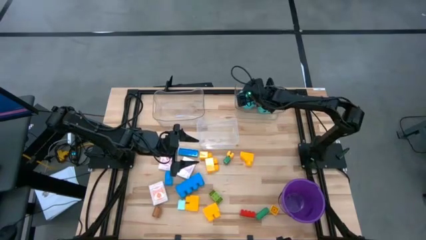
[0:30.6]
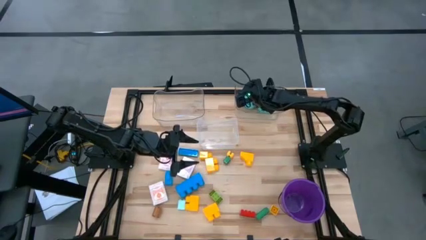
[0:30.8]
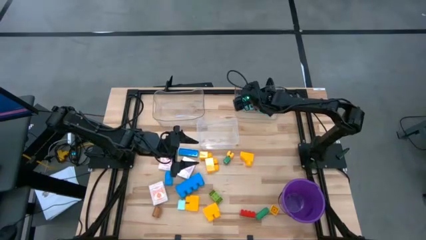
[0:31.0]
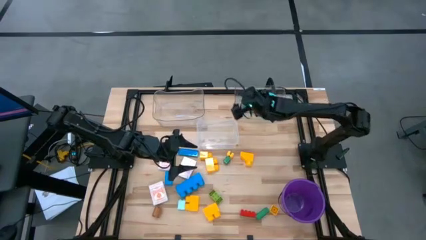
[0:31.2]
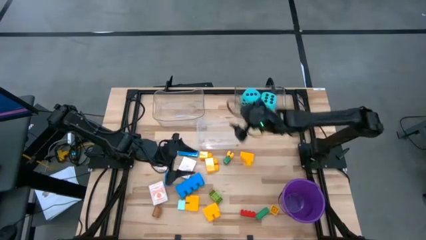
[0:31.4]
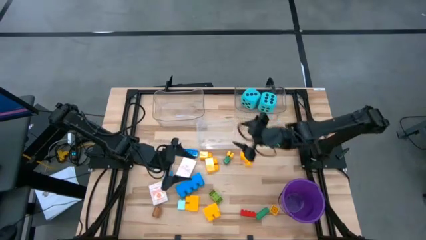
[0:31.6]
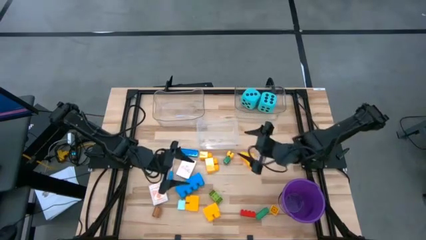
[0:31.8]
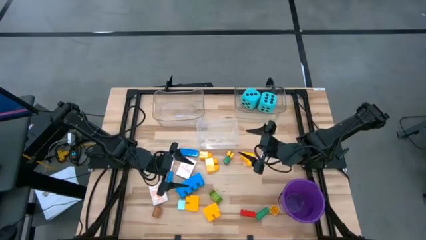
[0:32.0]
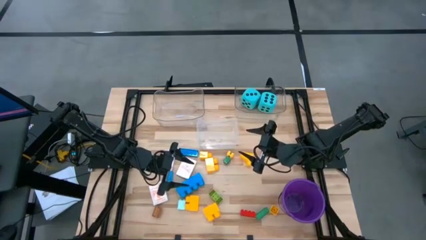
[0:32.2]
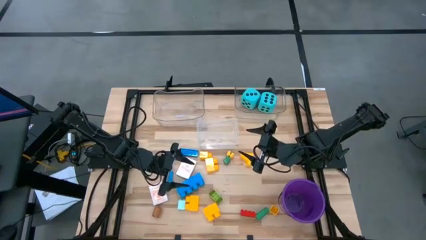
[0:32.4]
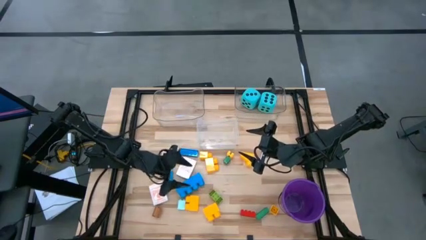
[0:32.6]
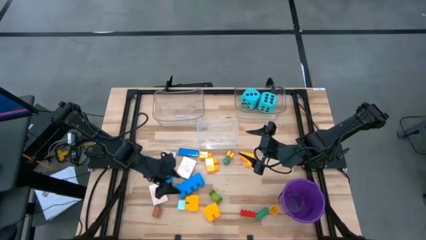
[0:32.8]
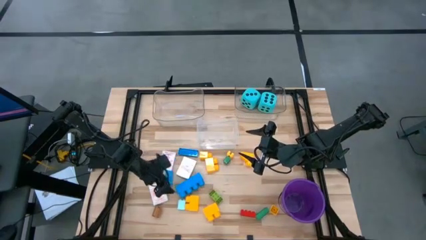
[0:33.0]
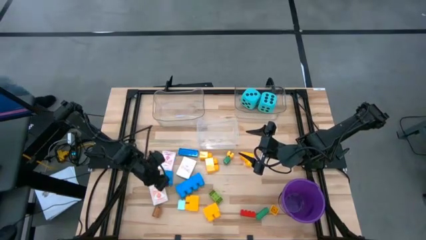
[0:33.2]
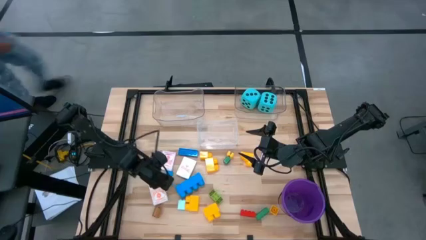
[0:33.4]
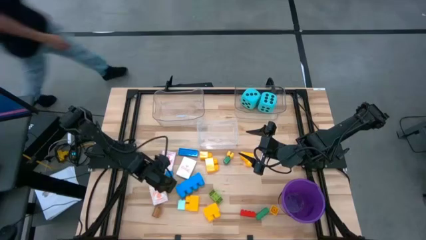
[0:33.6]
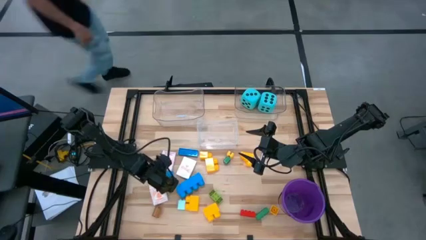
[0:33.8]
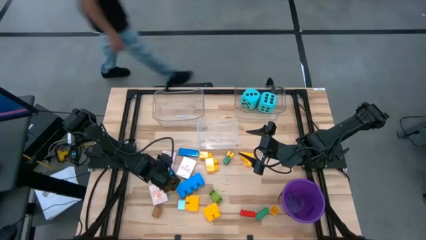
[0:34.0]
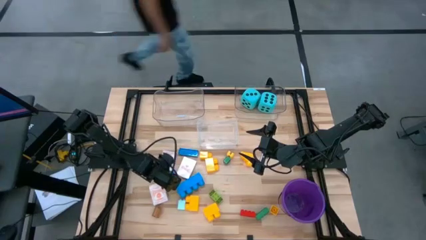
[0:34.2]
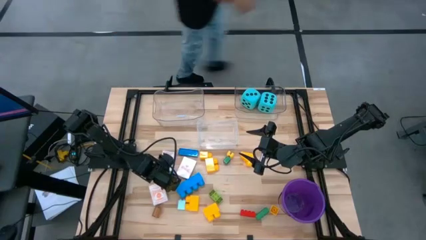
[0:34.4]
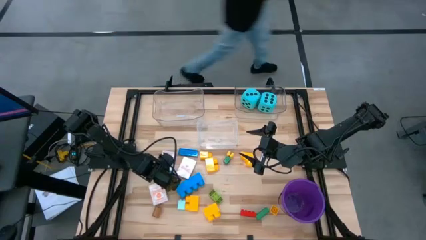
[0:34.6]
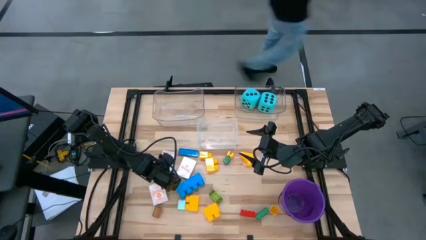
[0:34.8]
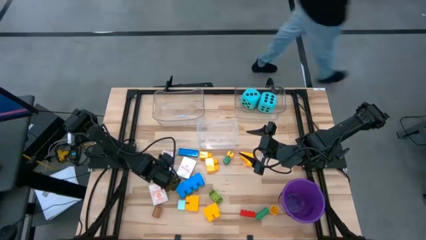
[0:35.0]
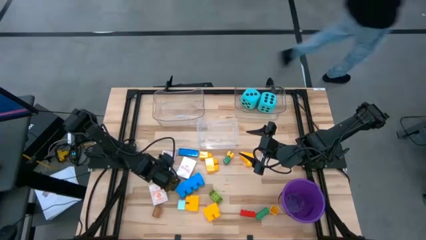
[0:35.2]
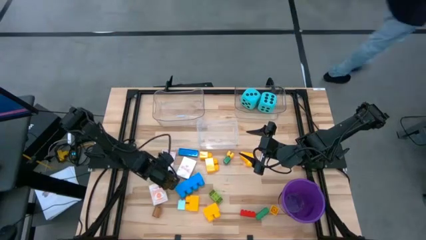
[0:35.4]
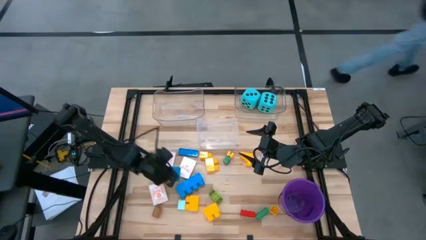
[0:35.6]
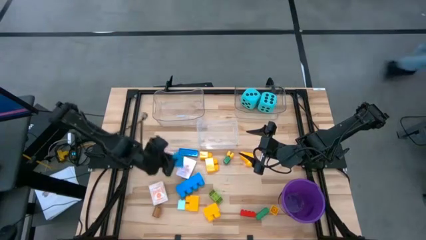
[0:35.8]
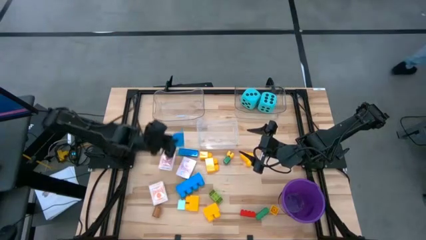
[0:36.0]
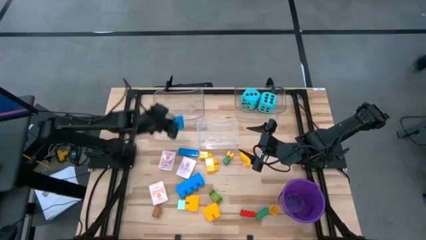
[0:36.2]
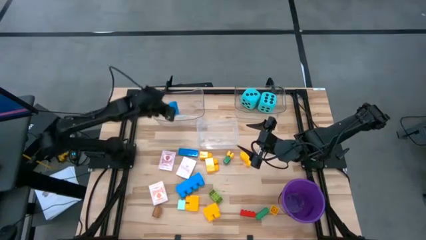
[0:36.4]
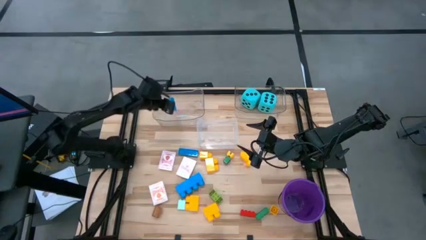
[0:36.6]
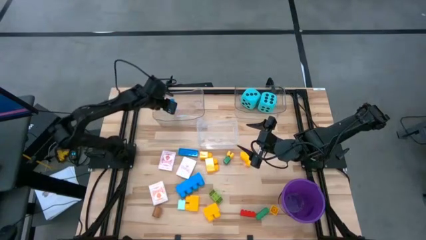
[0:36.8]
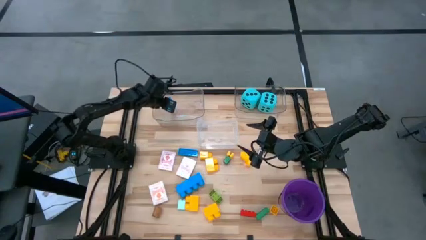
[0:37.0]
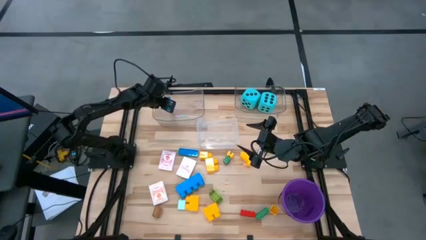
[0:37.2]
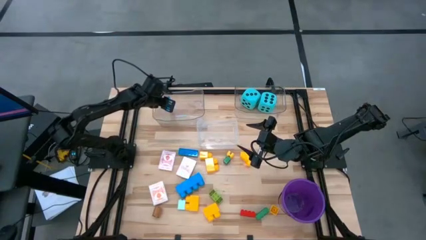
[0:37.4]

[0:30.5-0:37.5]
Task: Pick & Place Toys
Put the blue game piece into the top left transparent bin

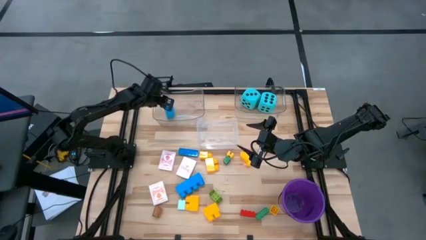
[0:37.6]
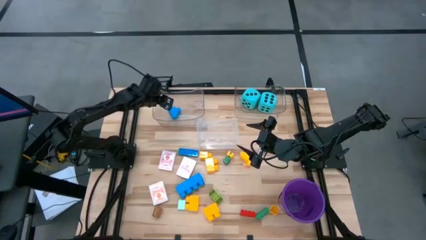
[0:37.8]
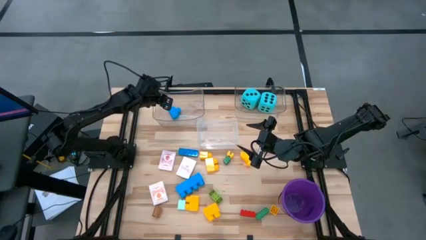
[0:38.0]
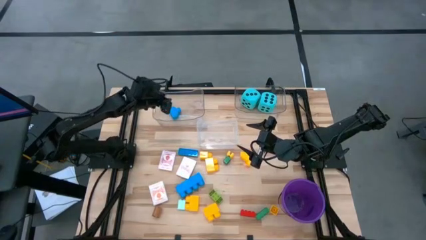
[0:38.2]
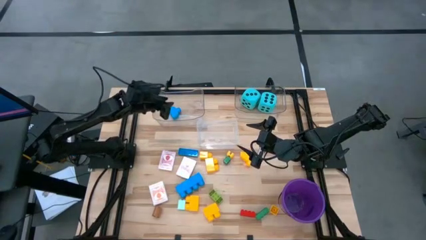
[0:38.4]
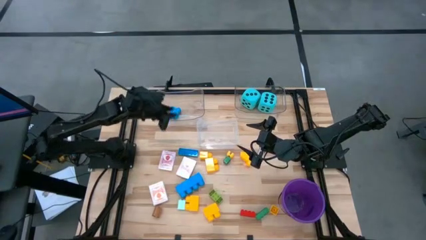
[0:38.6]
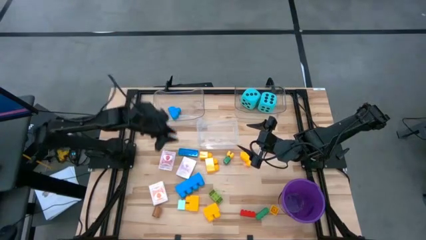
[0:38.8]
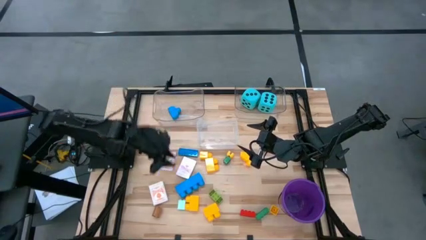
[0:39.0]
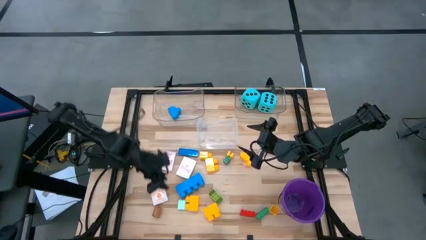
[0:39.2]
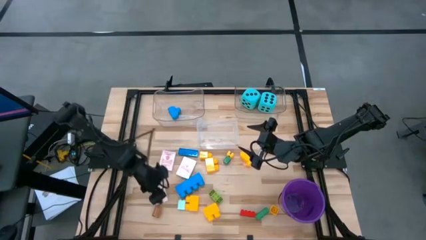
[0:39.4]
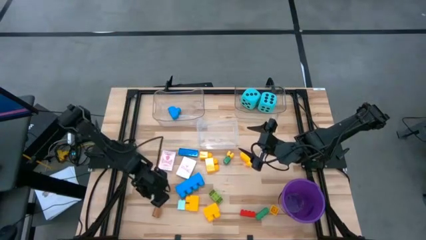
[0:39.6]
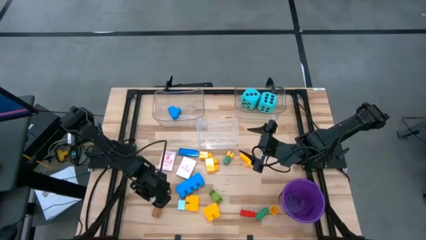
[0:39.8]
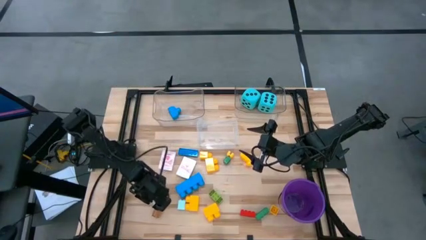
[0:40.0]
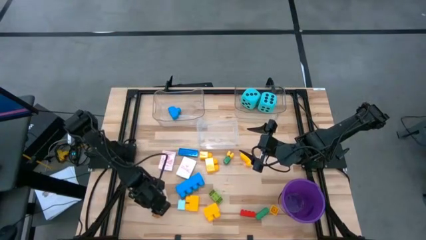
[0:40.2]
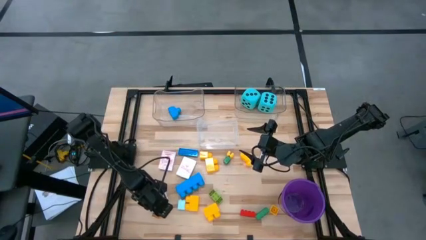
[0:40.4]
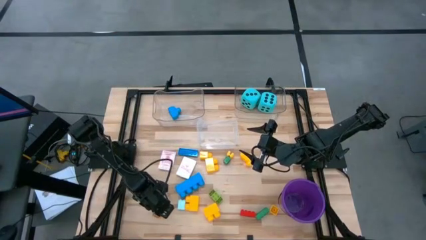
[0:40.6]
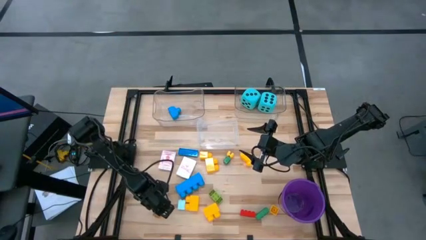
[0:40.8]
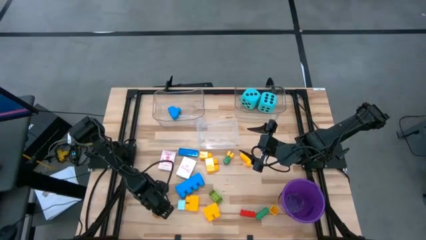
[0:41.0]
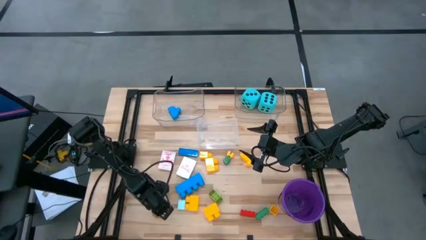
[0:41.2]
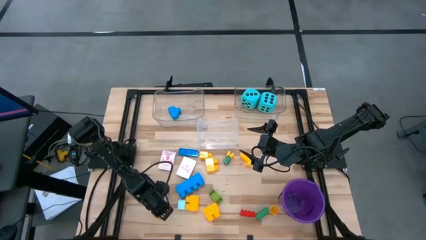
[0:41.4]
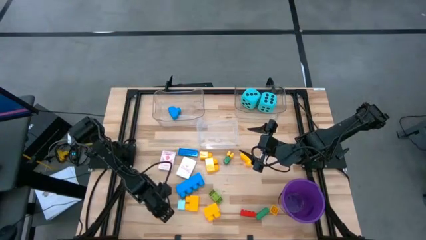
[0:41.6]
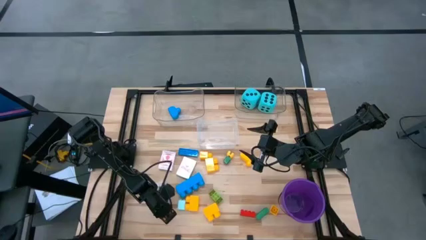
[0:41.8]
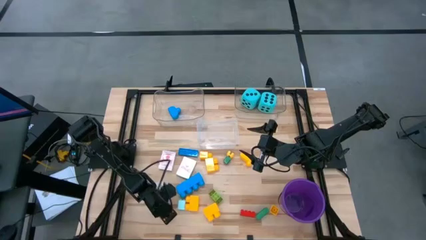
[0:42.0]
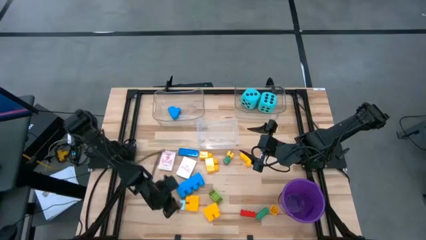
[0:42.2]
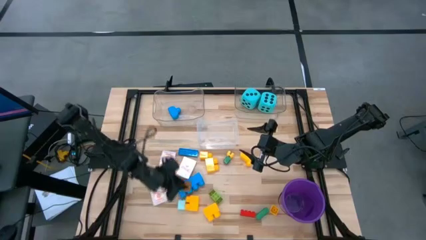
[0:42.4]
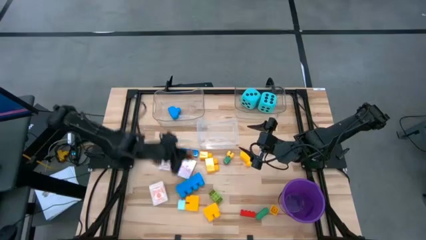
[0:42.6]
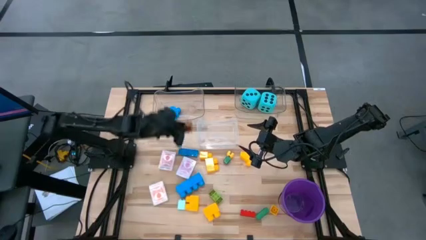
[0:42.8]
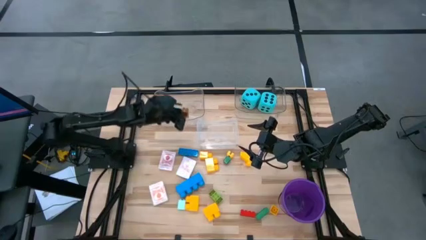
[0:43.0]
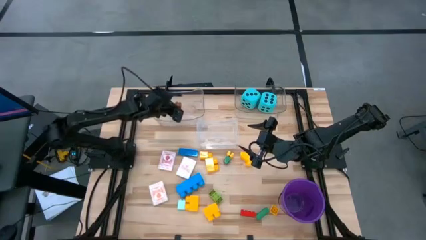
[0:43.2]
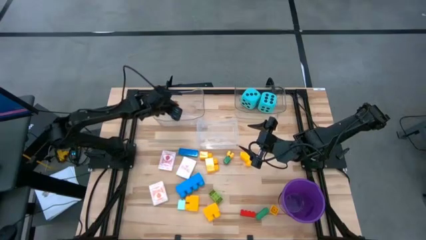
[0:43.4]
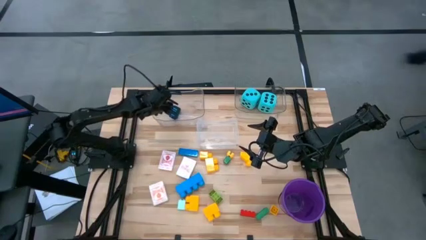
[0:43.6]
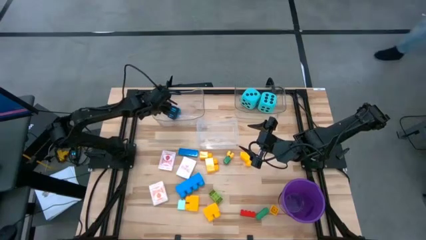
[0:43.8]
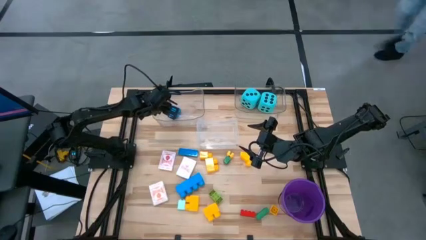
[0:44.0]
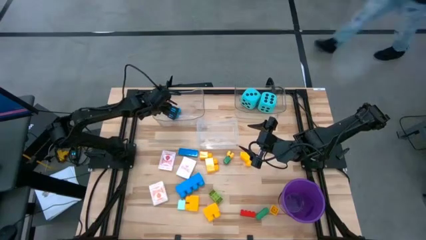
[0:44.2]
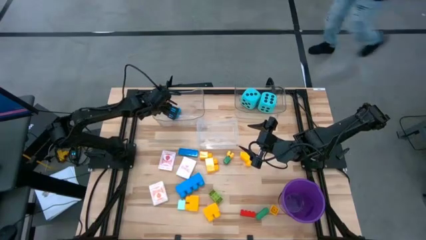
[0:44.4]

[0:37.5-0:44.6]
Put the brown game piece into the top left transparent bin

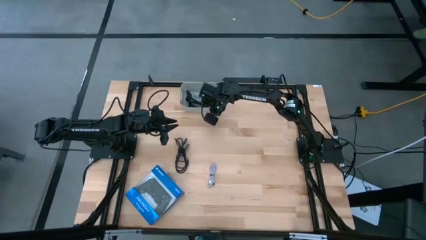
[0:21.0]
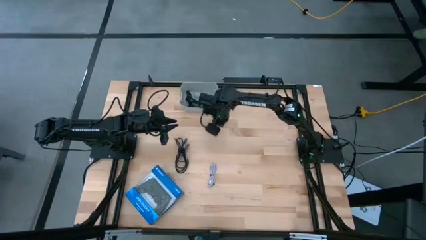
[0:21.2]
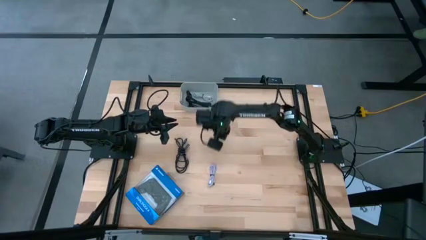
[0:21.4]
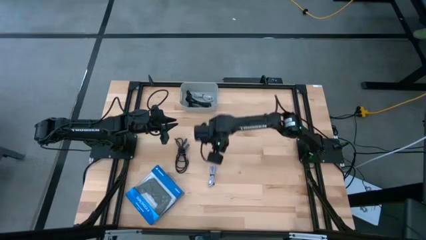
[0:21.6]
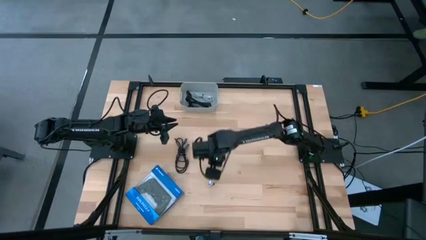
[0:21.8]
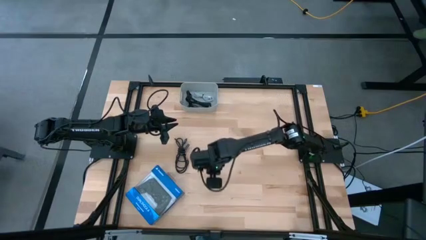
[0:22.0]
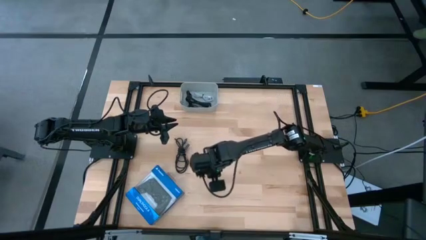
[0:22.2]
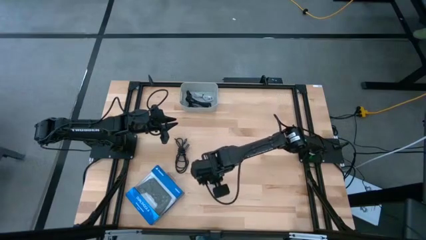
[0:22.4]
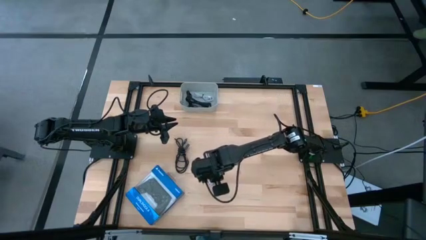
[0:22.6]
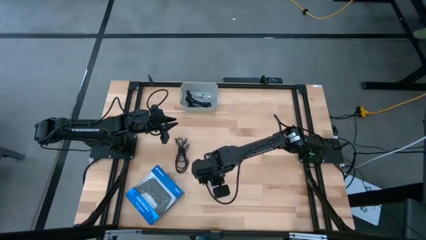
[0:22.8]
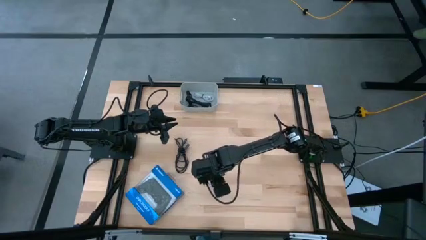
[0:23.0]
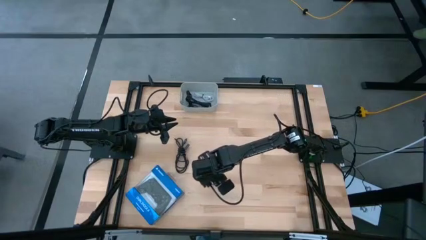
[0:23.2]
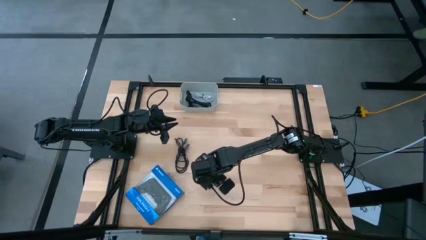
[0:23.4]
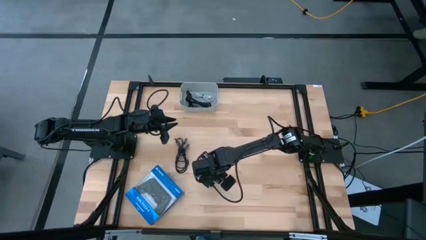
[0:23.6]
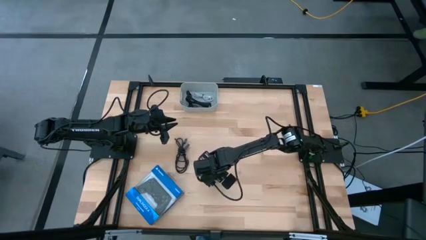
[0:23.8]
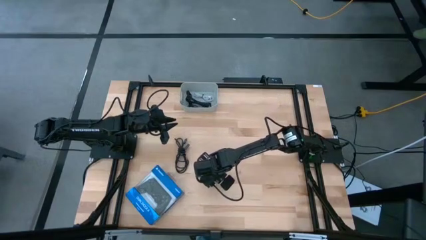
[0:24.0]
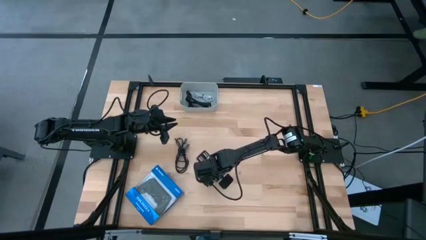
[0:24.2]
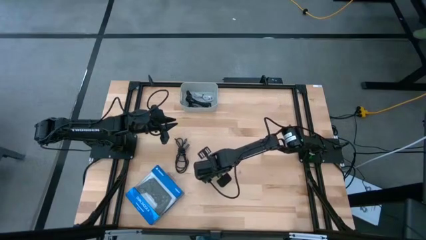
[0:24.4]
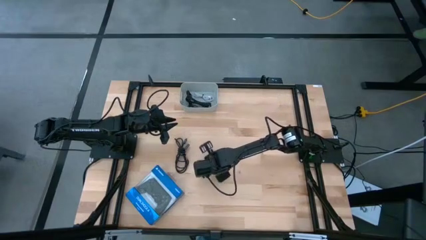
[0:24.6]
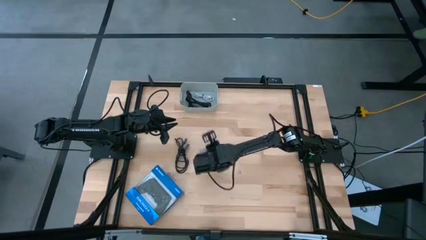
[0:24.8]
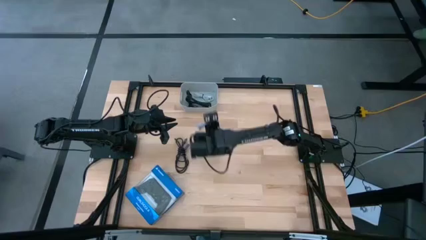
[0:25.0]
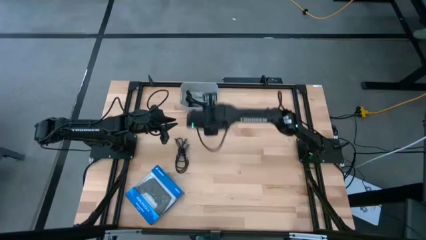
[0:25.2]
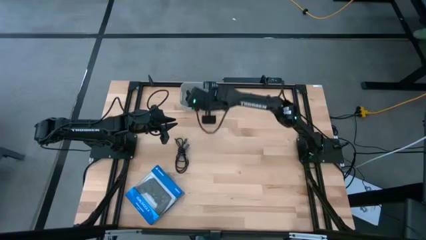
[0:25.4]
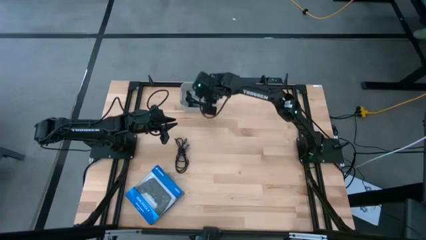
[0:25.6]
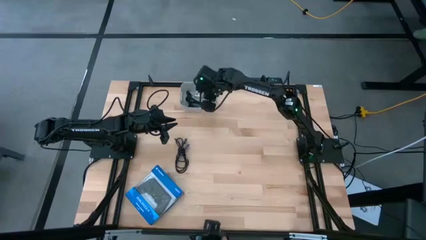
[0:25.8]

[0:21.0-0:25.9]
Task: Pick and place USB-C Cables
Put the white charger cable into the white bin
